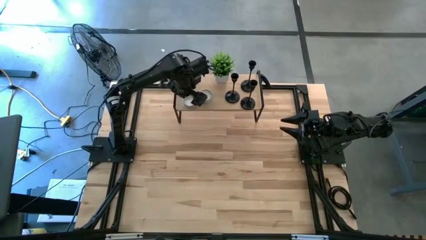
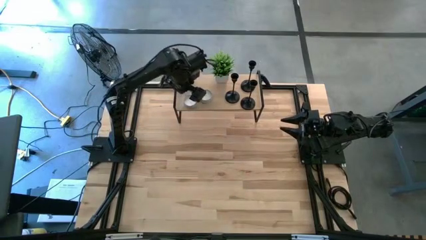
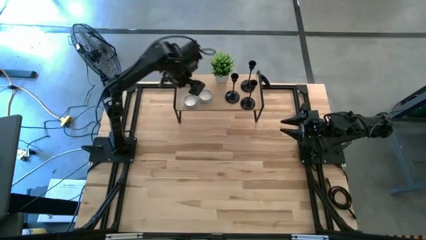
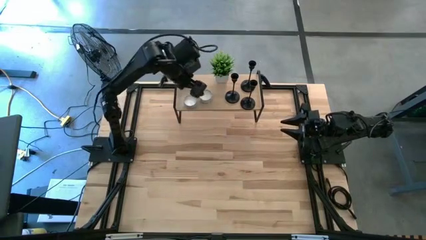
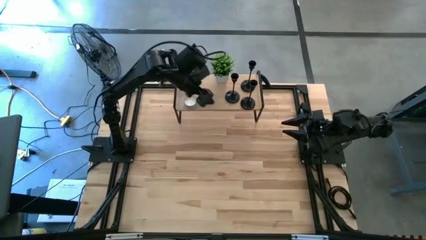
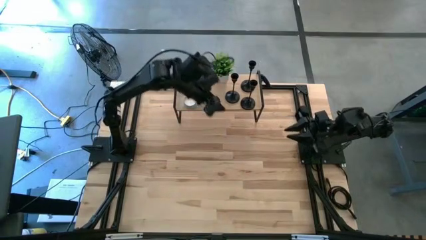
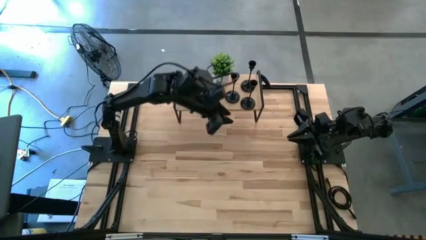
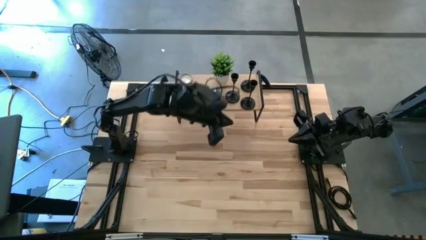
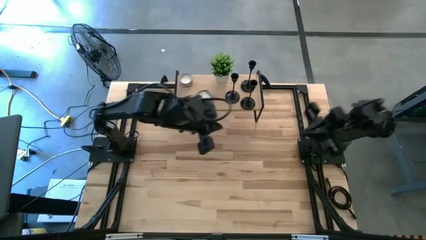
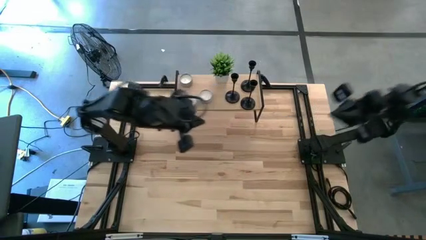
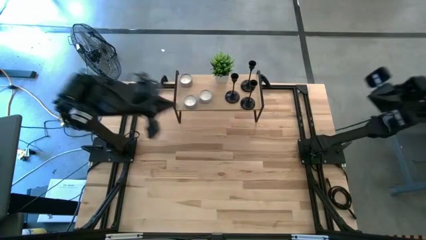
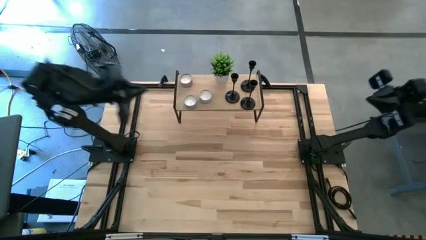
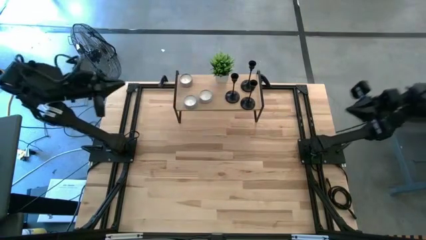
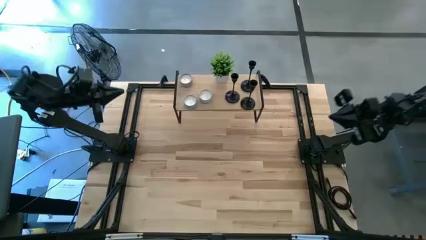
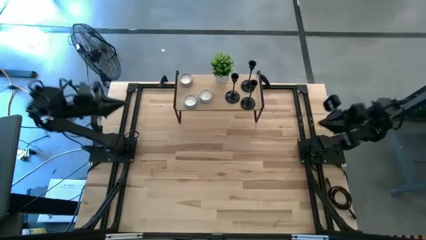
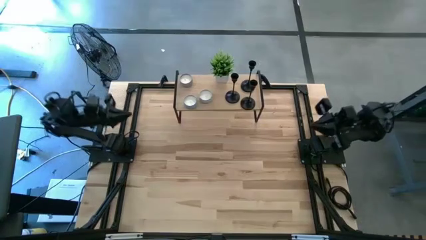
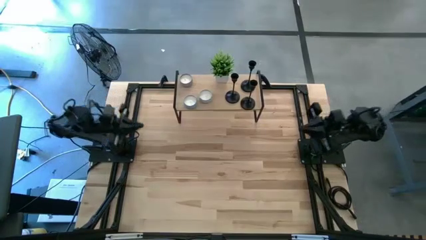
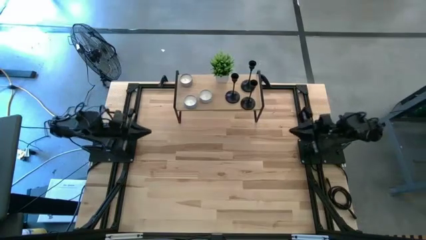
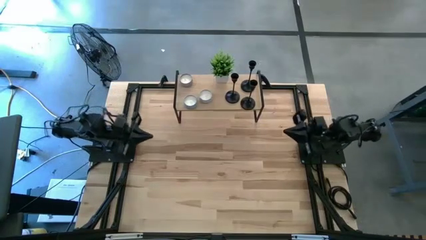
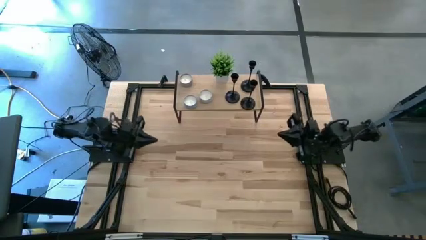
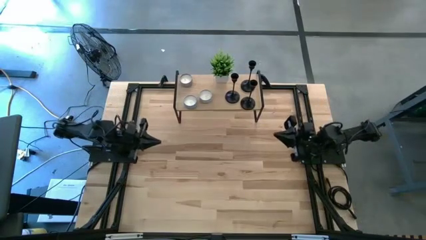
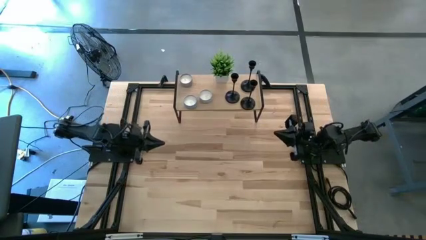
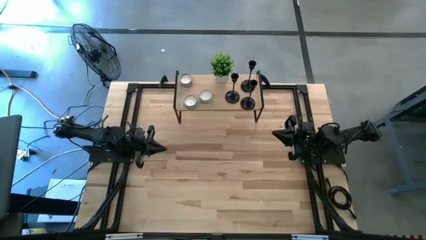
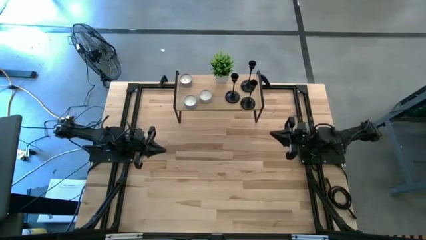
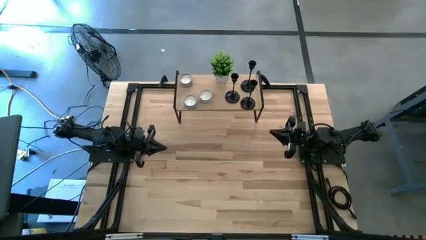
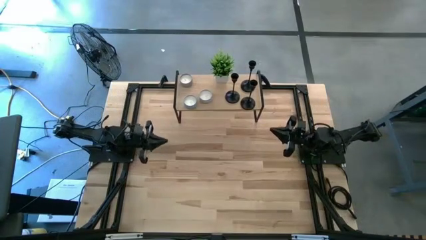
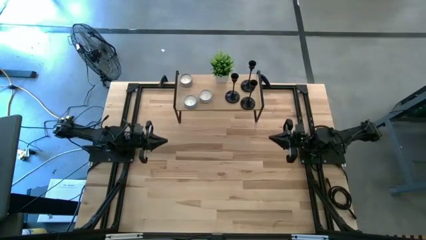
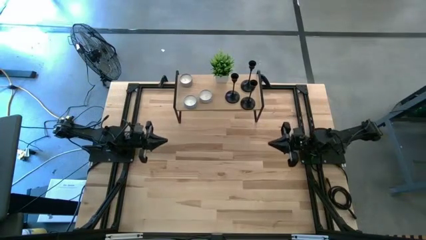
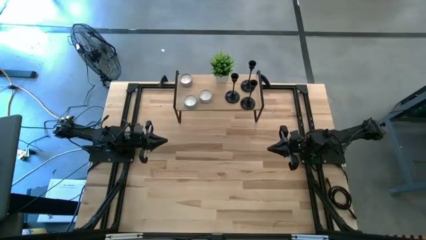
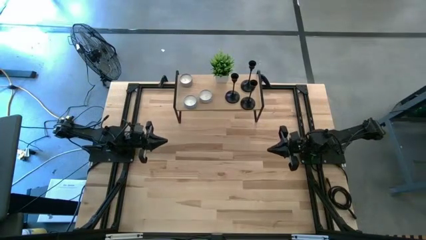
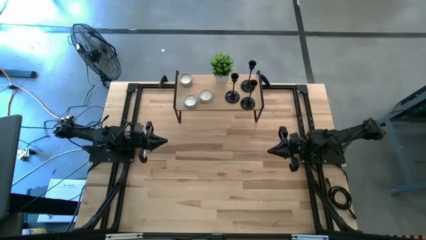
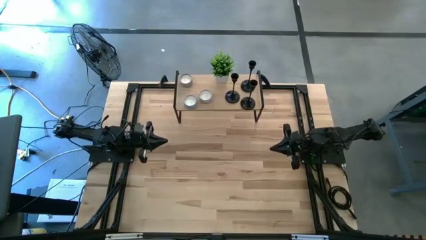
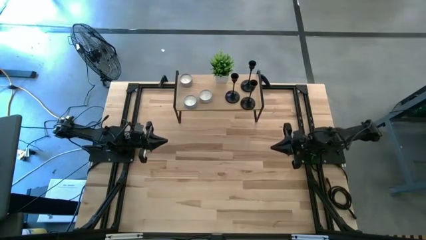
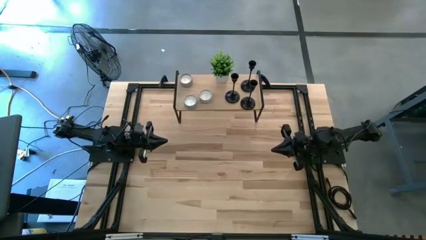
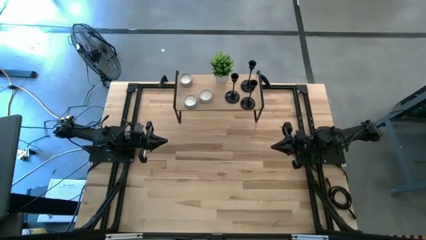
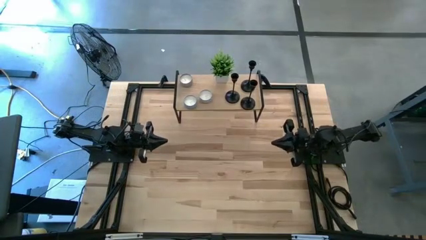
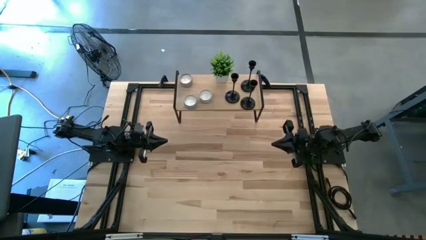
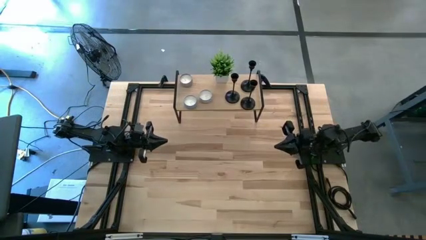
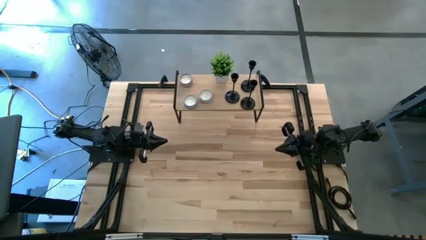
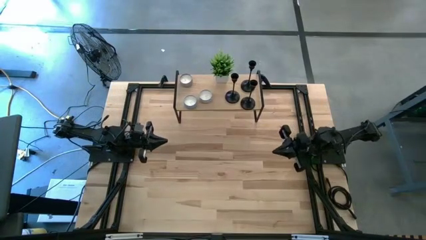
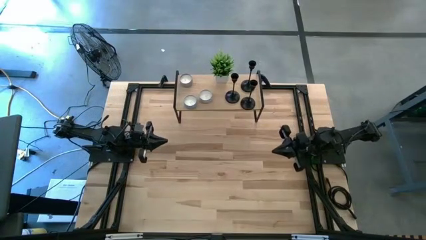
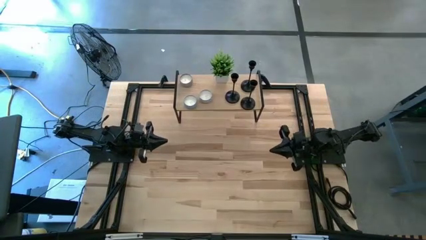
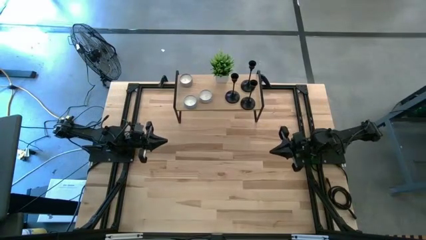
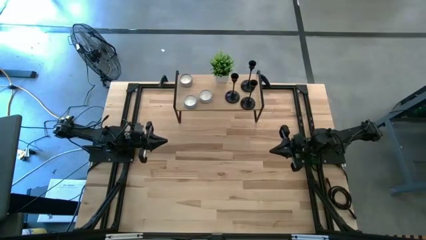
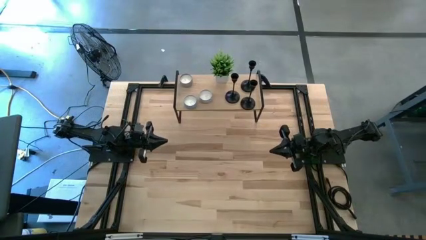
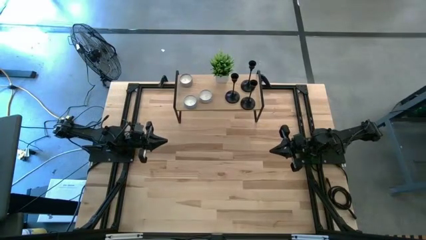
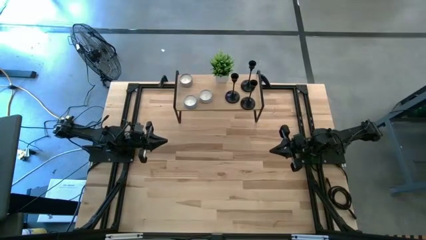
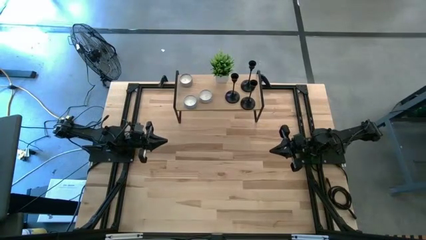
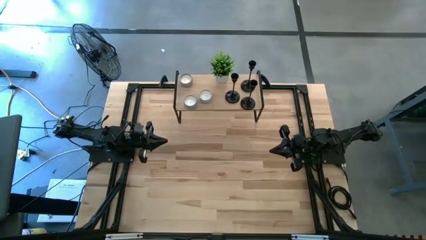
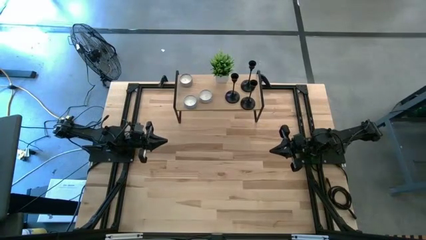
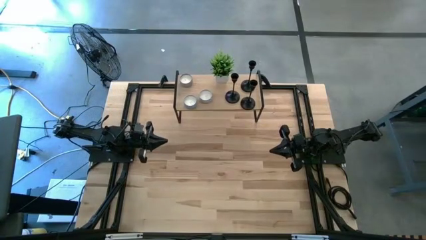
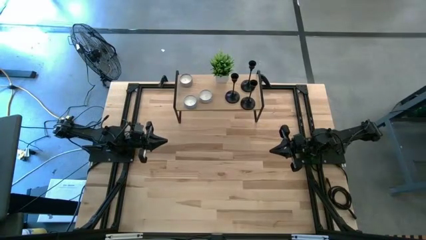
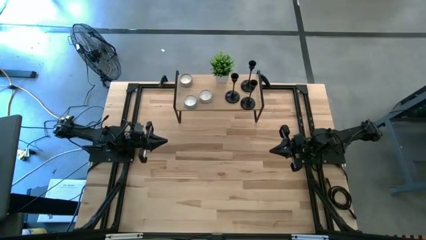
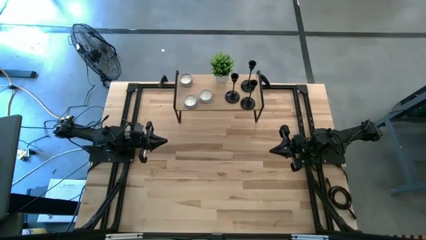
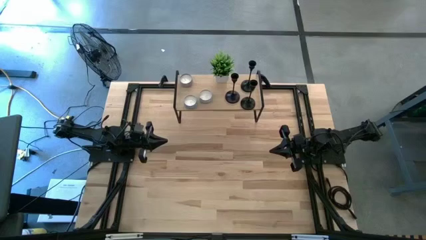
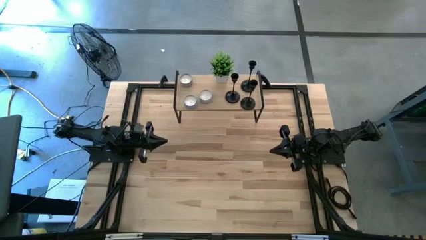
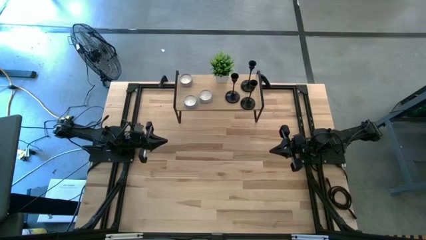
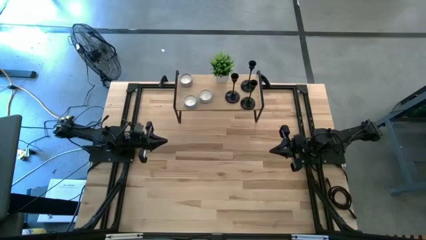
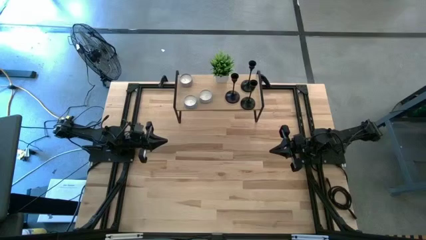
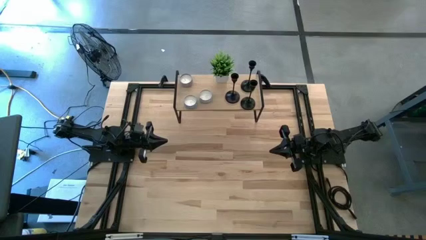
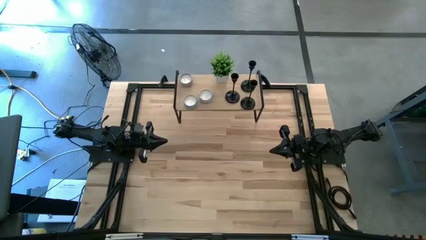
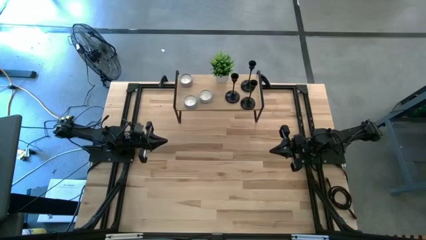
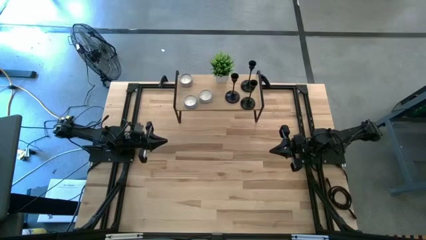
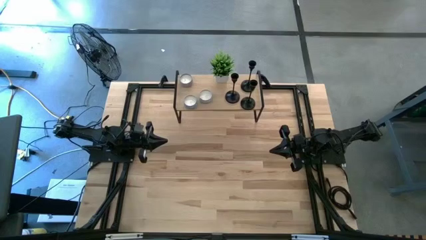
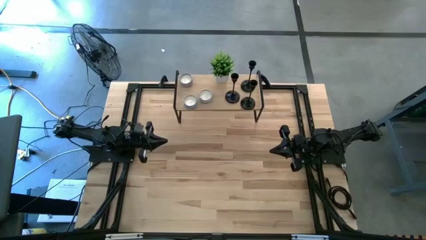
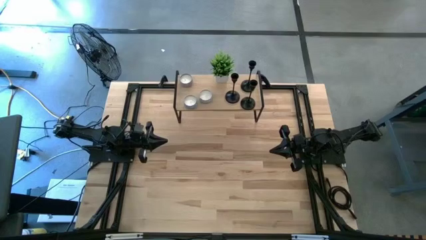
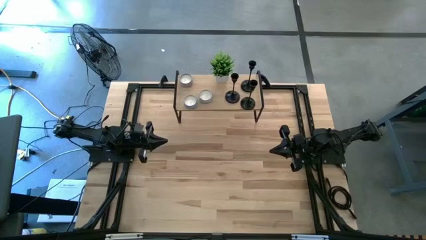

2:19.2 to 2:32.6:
Task: Pick & Place candle stick holders
Return to Home Position

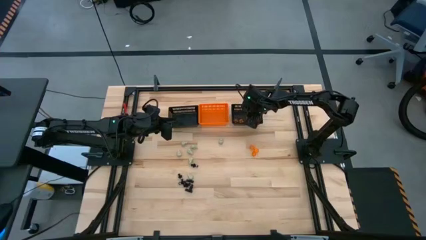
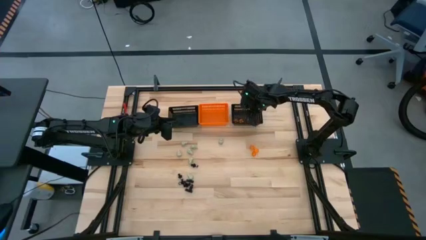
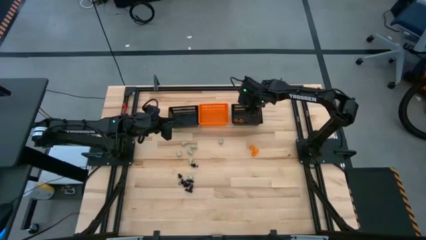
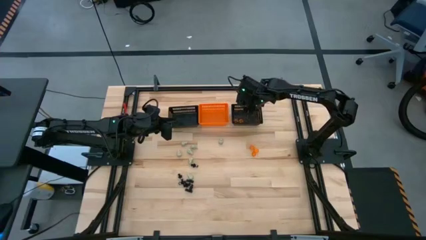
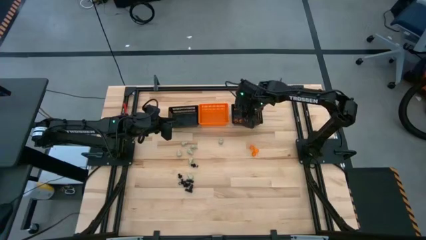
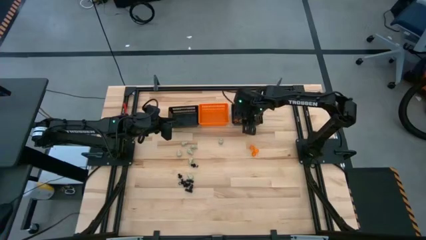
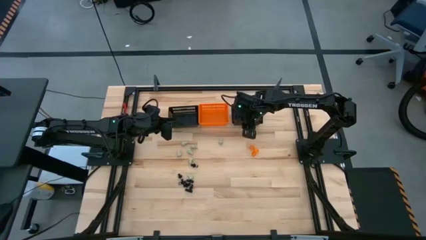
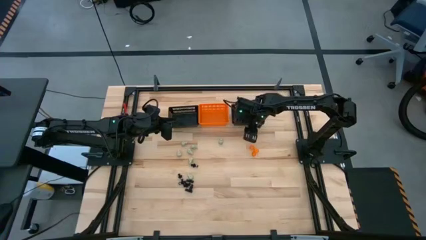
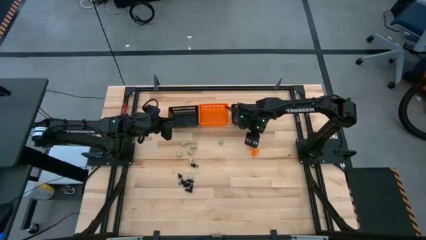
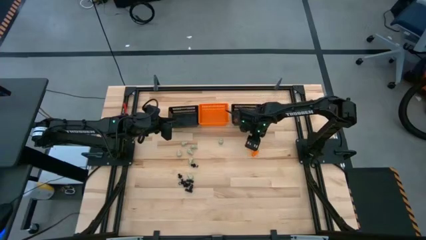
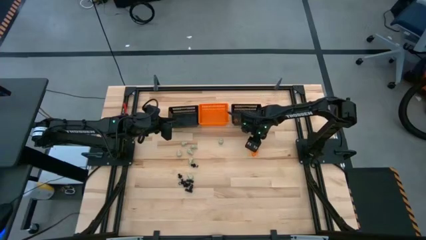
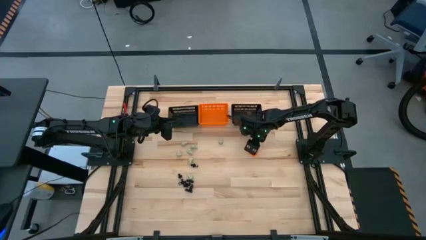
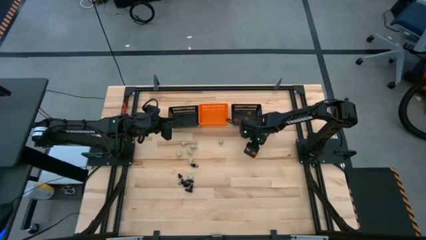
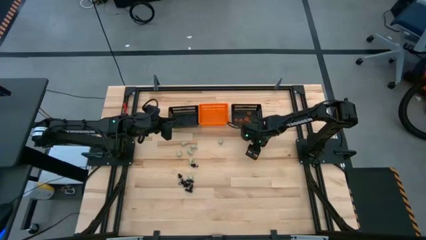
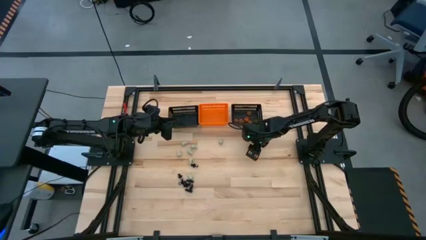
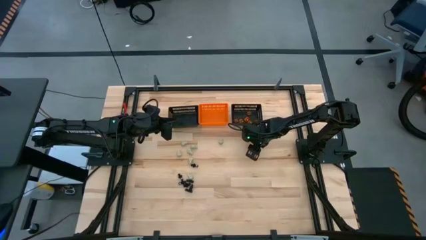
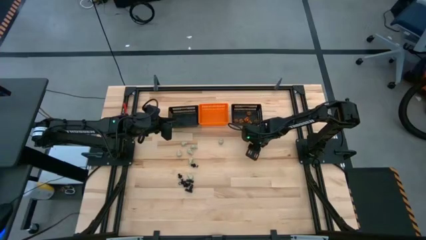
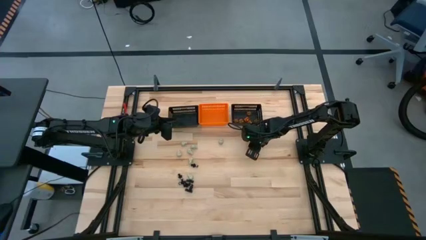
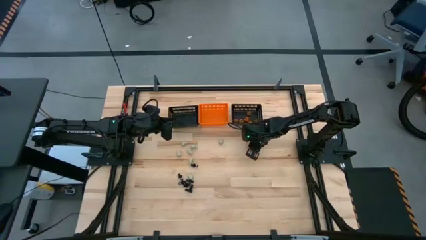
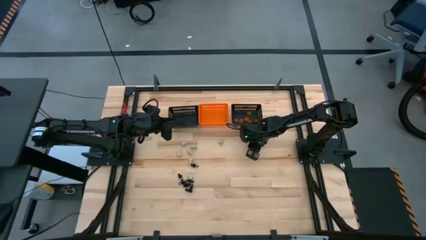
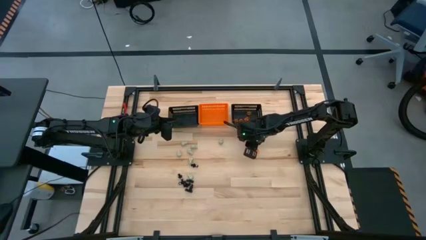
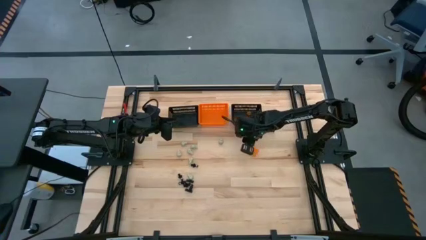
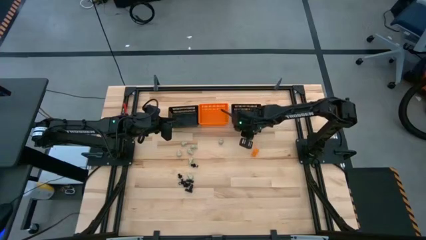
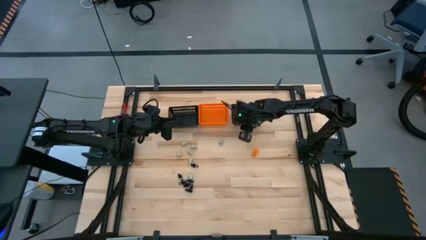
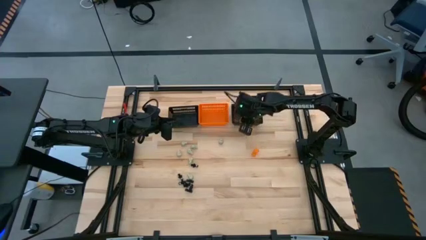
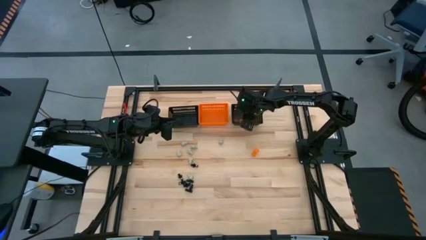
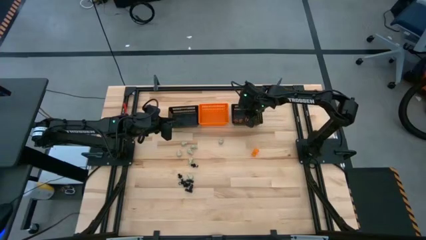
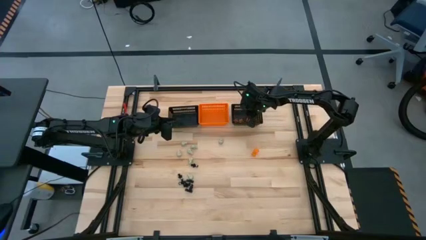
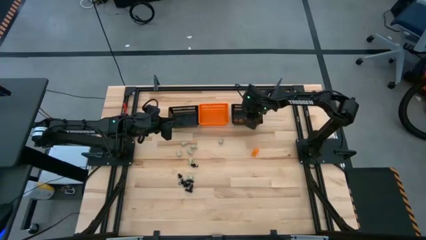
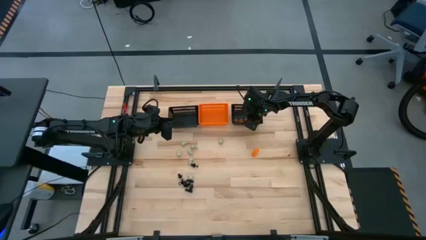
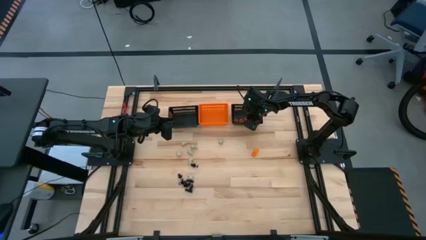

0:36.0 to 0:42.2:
Task: Sort Halloween decoration
Put the orange pumpkin toy into the right black bin
